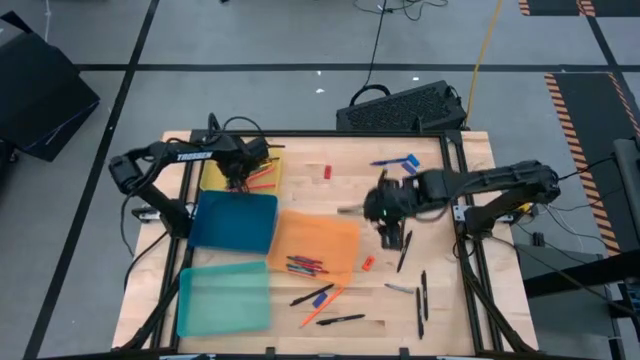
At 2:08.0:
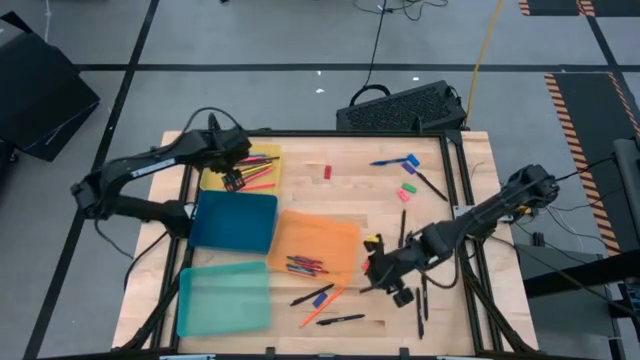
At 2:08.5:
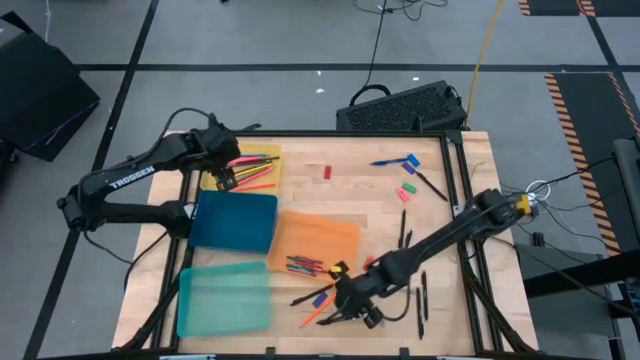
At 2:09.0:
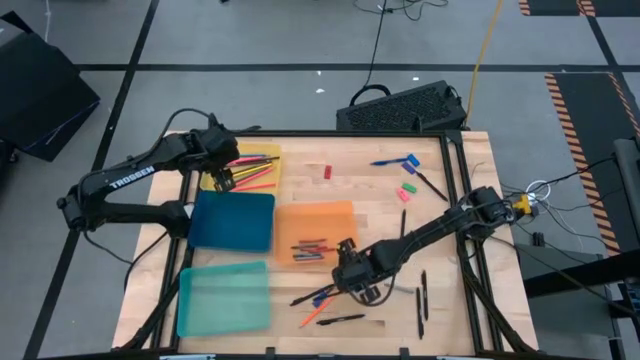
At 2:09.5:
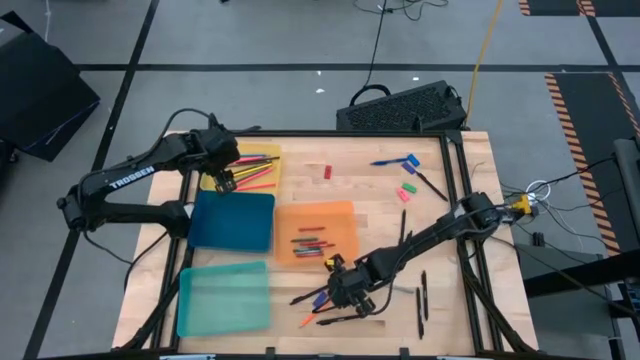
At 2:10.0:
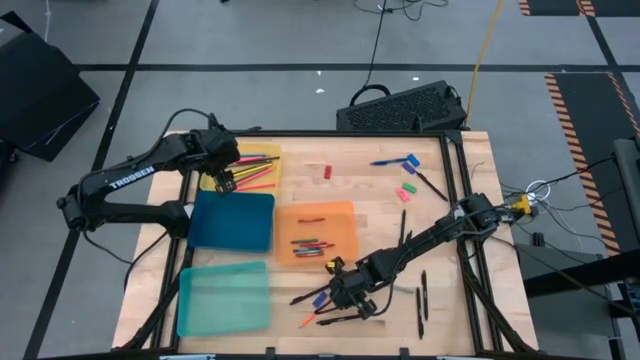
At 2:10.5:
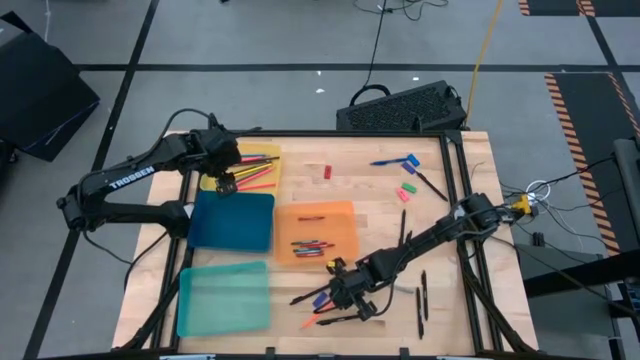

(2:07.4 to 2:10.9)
Task: Sort crayons/erasers/pens/pencils in bins
Put the orange pencil into yellow bin

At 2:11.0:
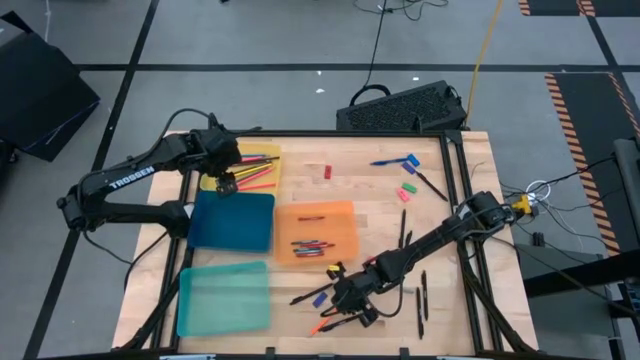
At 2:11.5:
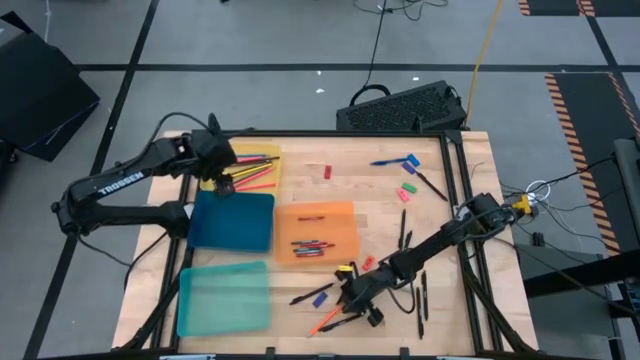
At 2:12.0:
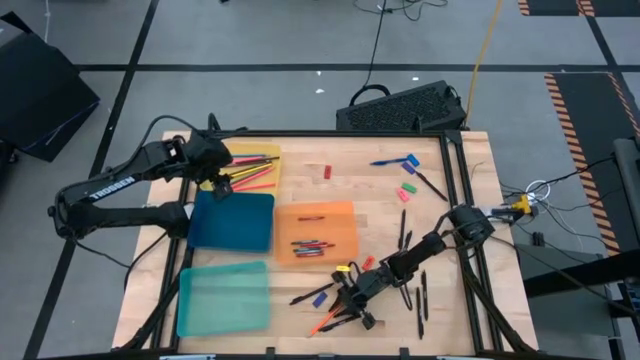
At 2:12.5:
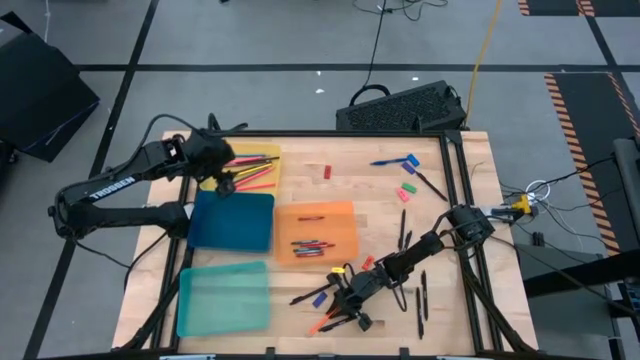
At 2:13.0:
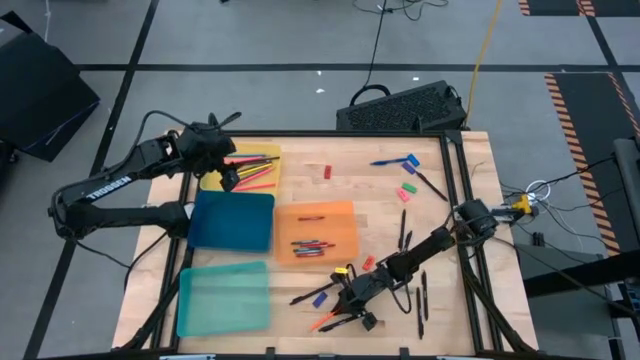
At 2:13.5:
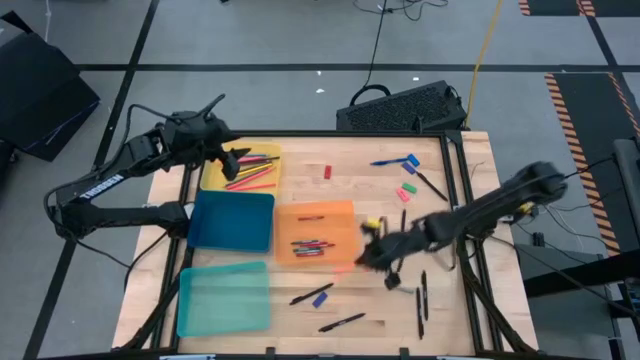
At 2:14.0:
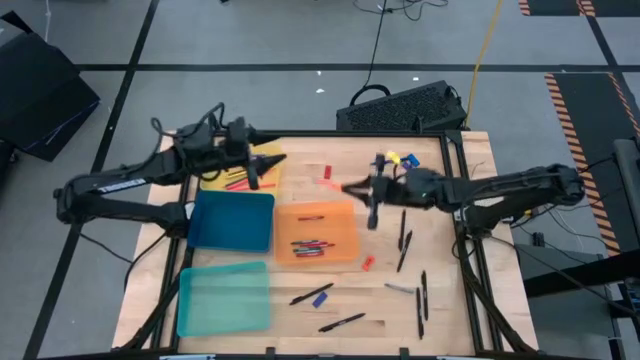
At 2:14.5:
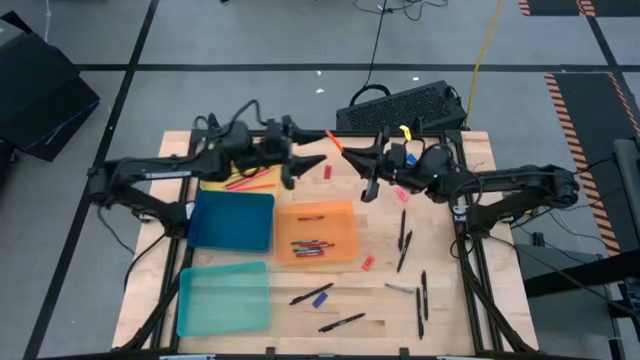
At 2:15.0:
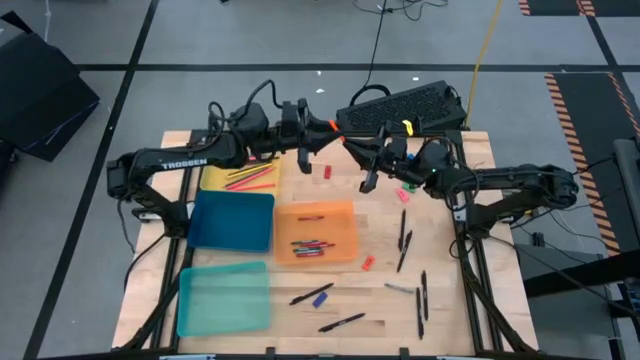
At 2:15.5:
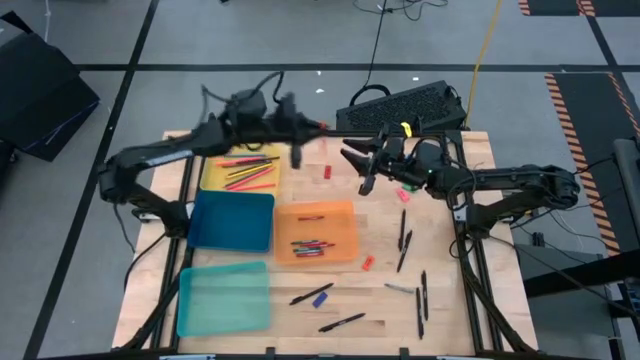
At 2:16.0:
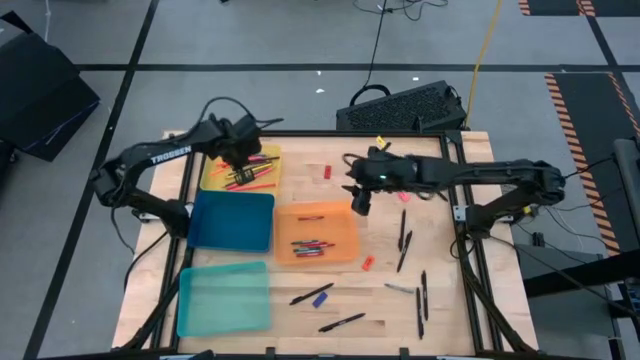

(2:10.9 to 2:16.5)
Put the orange pencil into yellow bin

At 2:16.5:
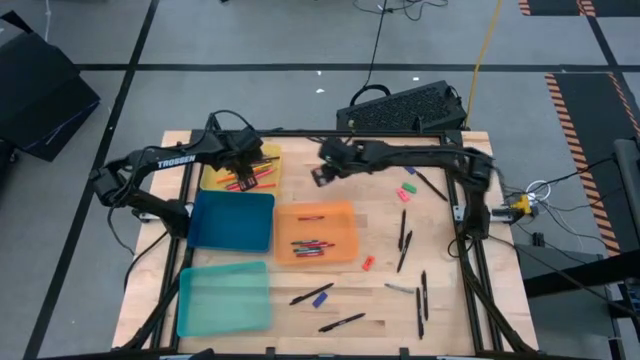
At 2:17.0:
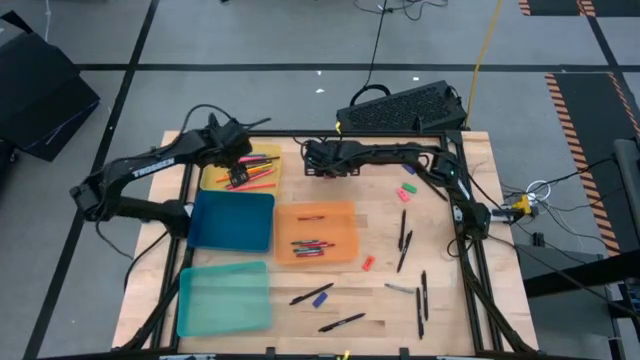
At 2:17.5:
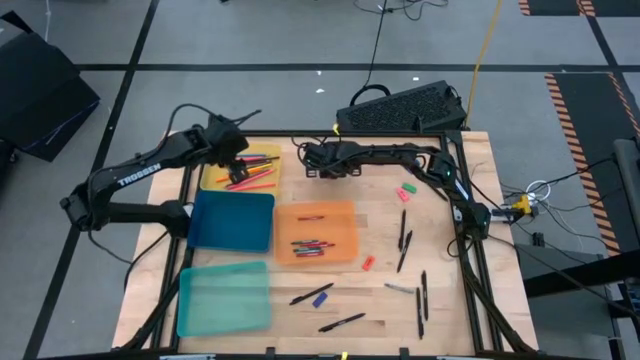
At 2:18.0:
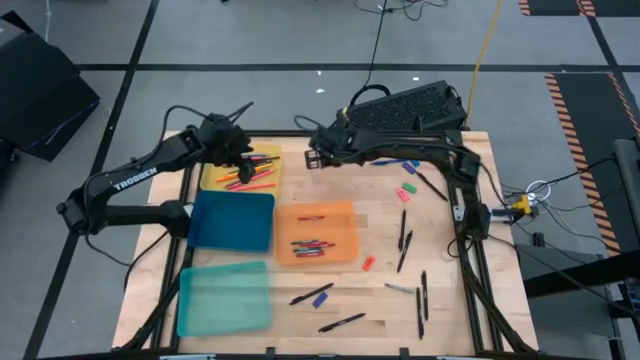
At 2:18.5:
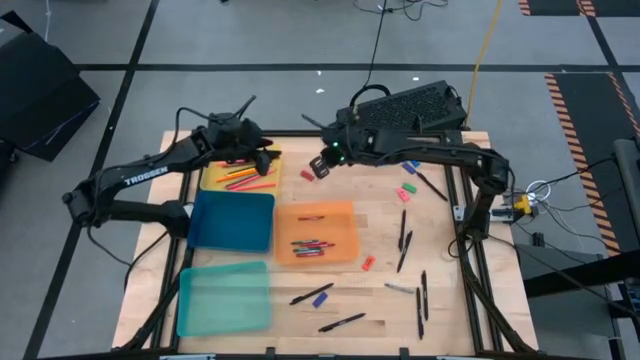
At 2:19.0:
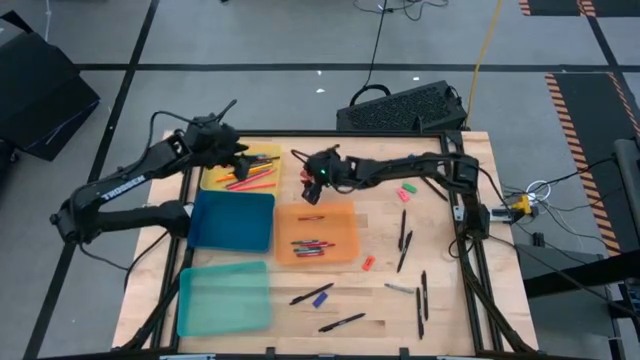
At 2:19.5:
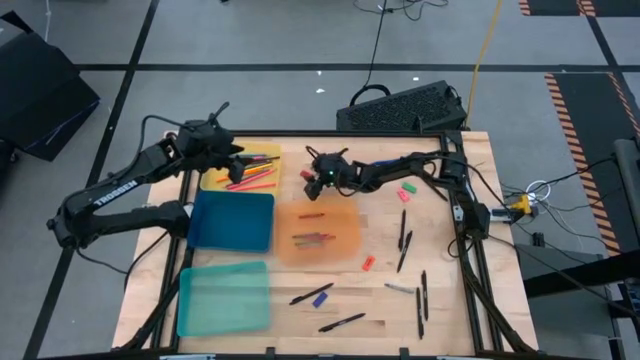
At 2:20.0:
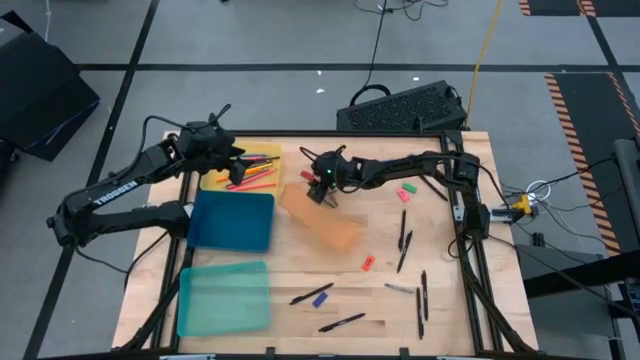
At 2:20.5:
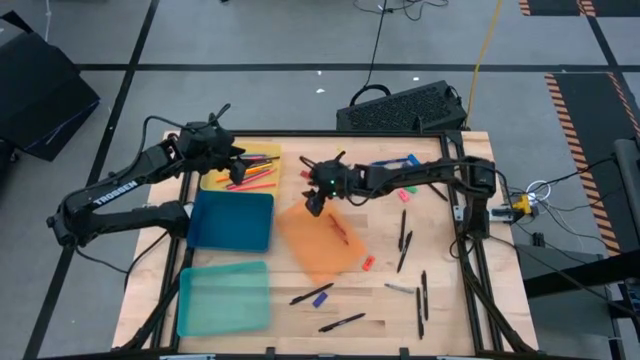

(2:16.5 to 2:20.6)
Put the red eraser into the blue bin

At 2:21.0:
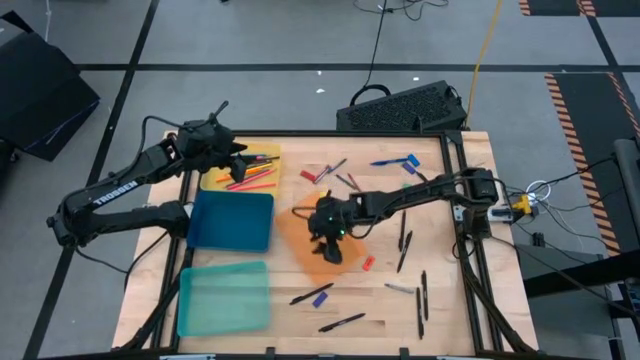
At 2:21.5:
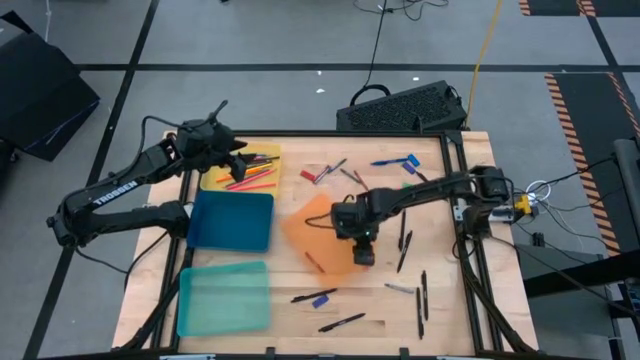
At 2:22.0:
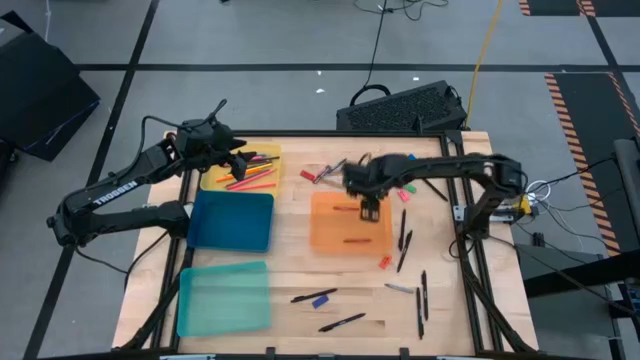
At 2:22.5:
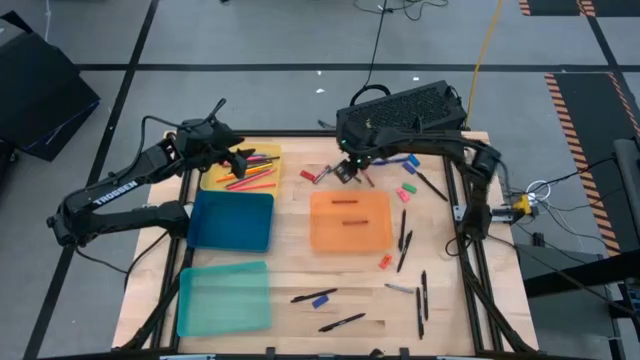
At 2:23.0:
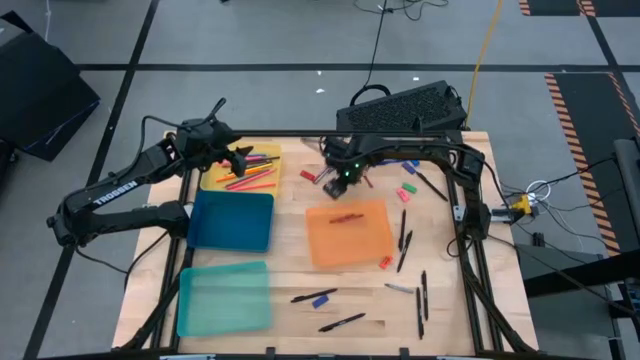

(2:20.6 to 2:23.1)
Adjust the orange bin

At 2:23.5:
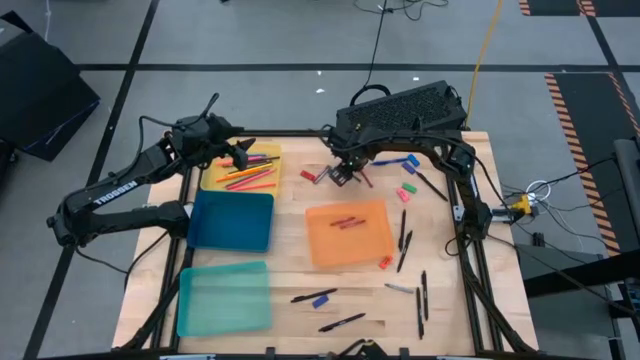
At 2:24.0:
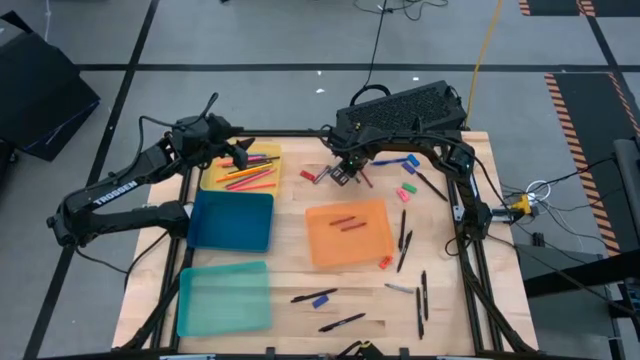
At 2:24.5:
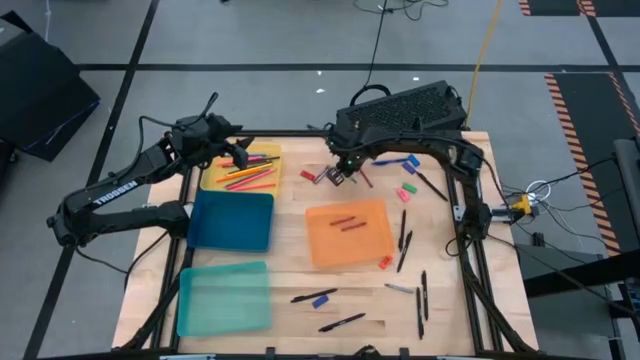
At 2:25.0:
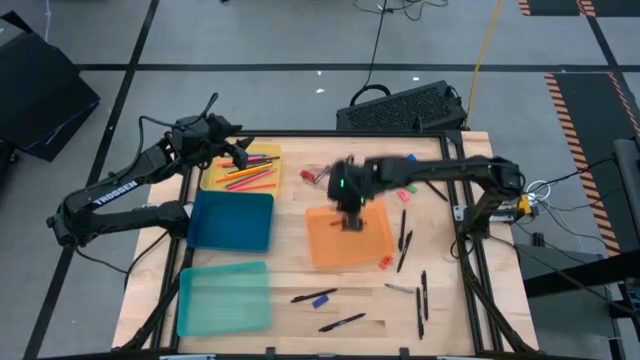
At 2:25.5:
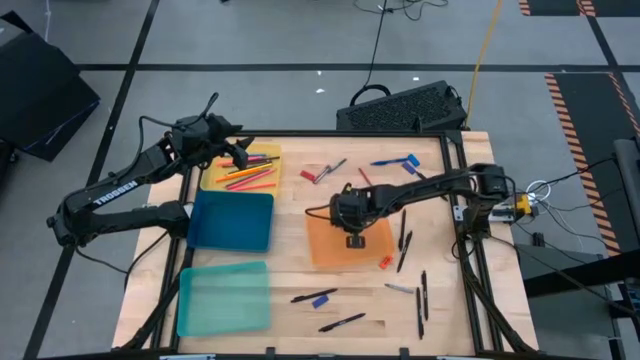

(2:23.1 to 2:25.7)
Put the green crayon into the orange bin

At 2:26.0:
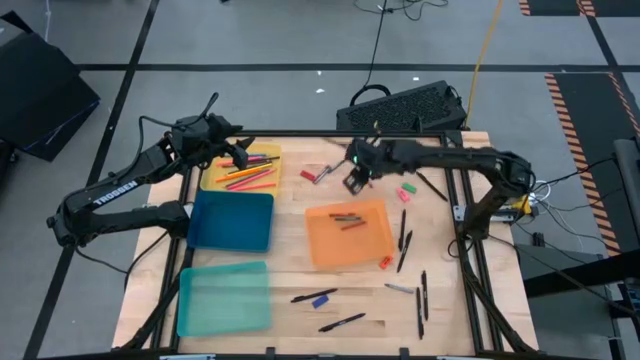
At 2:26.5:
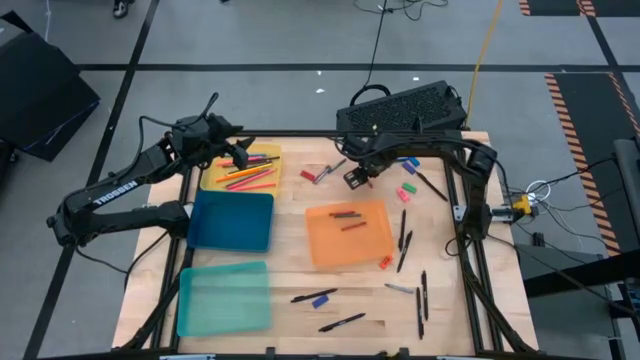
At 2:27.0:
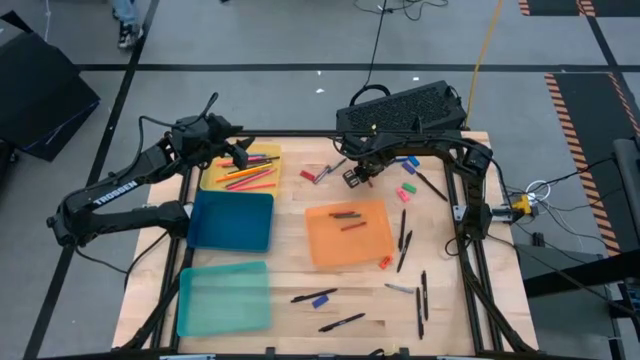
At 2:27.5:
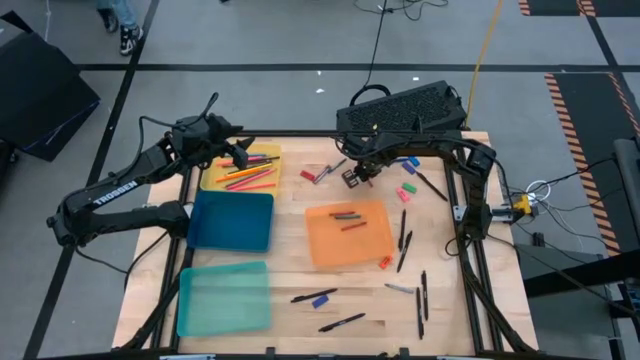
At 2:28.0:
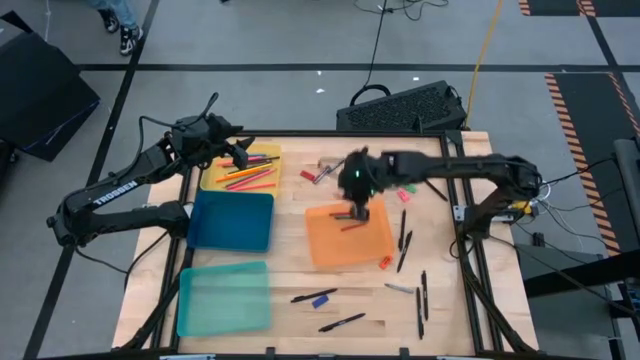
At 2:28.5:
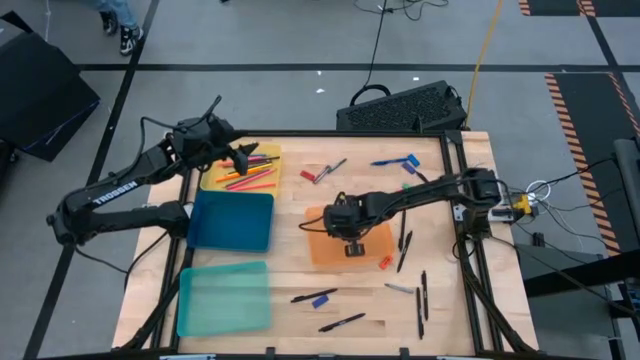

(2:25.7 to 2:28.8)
Put the red crayon into the orange bin
